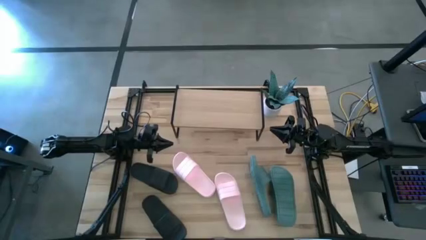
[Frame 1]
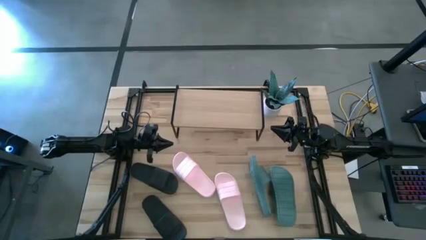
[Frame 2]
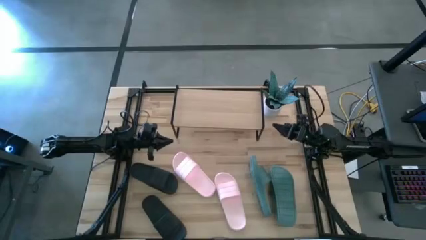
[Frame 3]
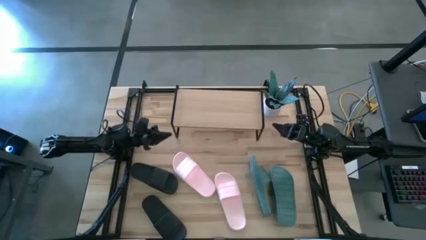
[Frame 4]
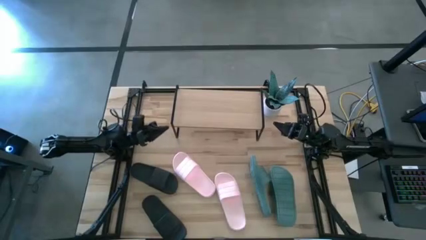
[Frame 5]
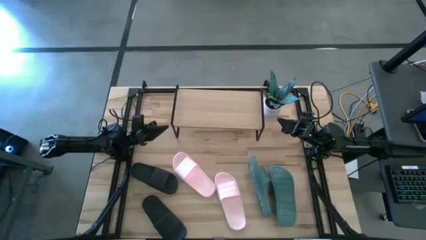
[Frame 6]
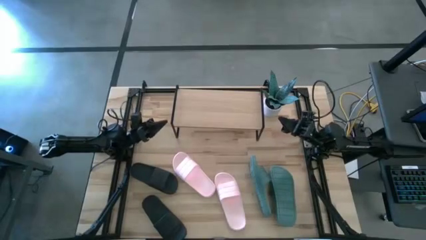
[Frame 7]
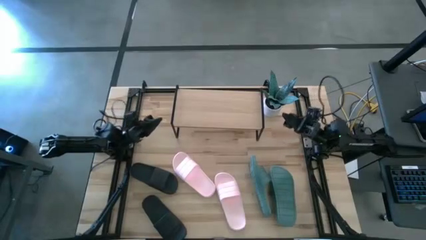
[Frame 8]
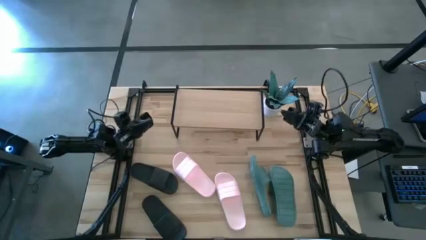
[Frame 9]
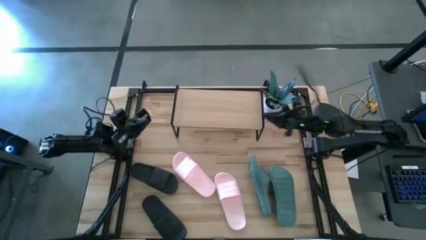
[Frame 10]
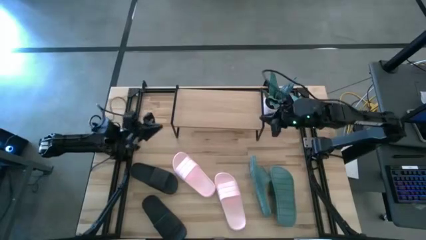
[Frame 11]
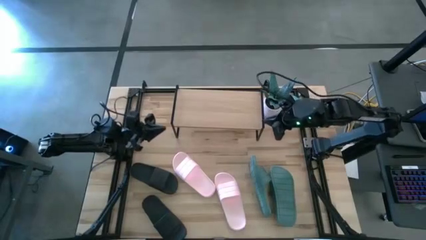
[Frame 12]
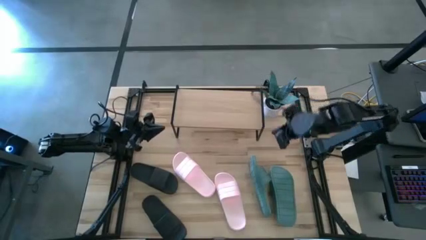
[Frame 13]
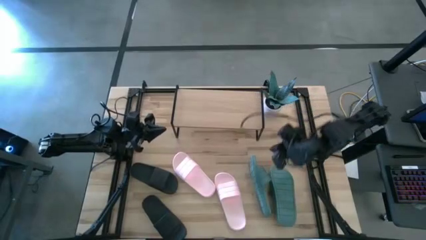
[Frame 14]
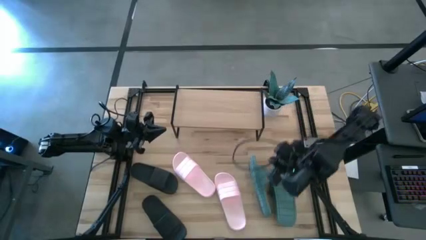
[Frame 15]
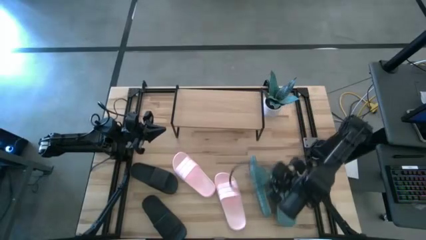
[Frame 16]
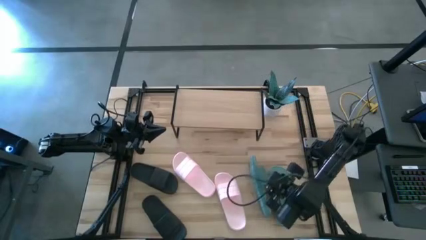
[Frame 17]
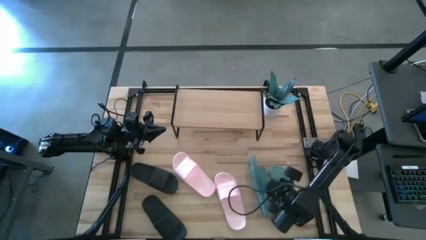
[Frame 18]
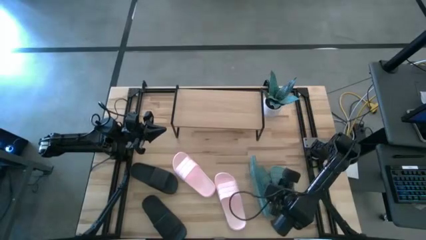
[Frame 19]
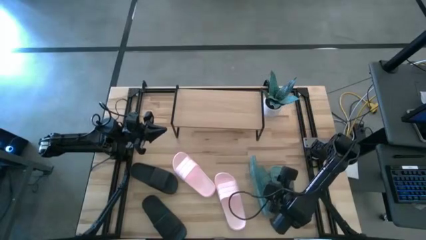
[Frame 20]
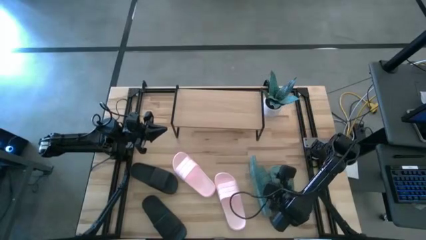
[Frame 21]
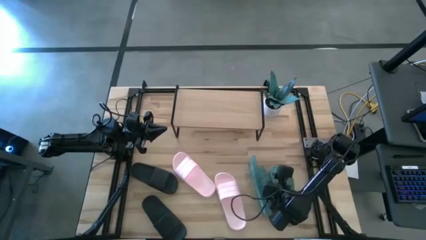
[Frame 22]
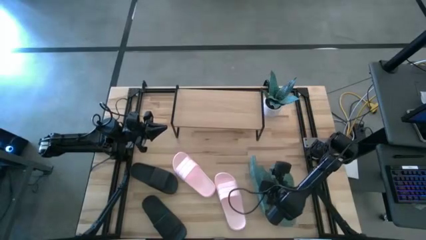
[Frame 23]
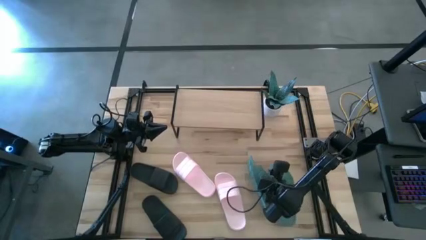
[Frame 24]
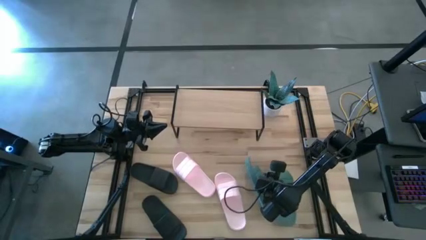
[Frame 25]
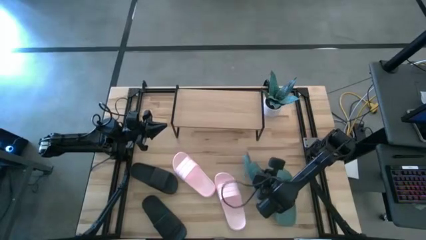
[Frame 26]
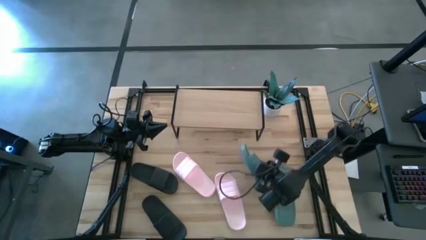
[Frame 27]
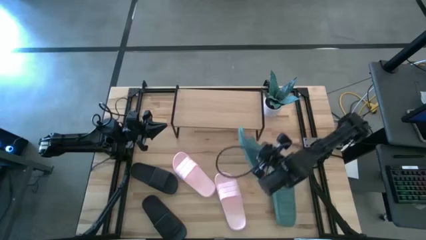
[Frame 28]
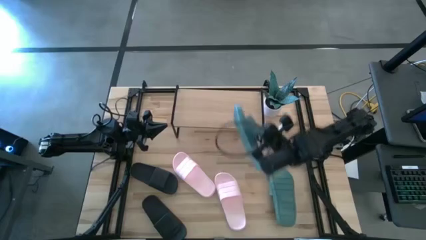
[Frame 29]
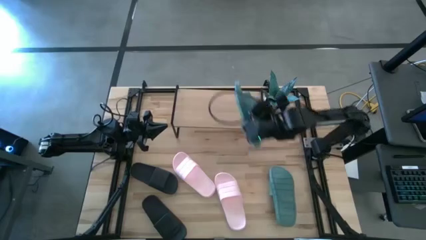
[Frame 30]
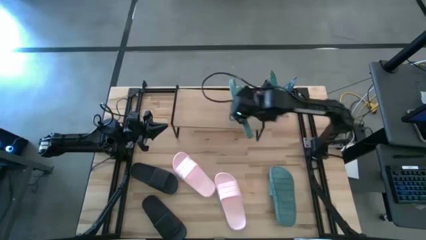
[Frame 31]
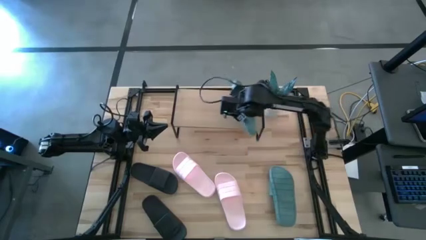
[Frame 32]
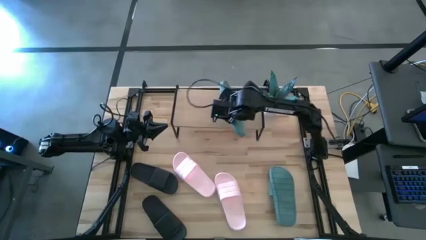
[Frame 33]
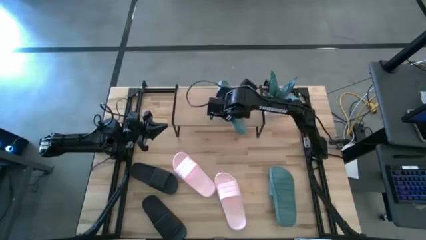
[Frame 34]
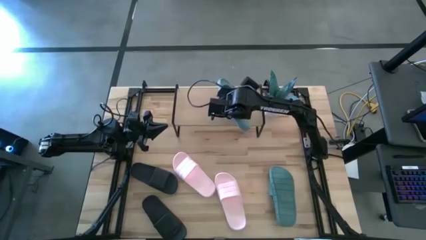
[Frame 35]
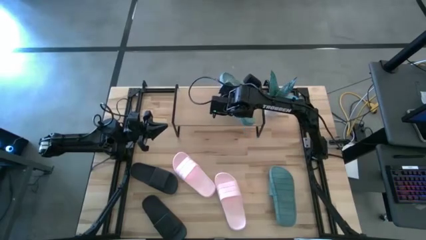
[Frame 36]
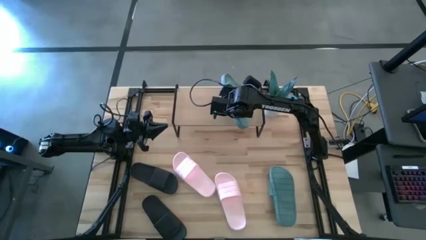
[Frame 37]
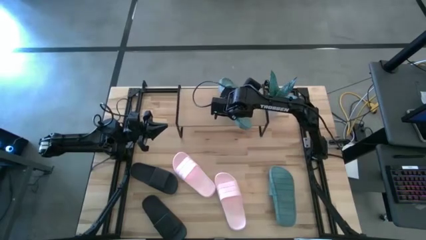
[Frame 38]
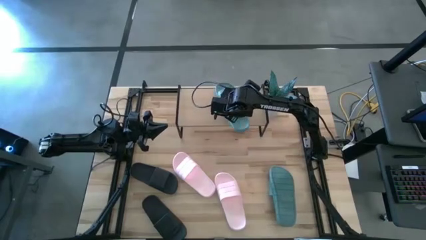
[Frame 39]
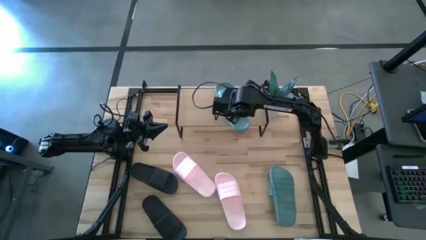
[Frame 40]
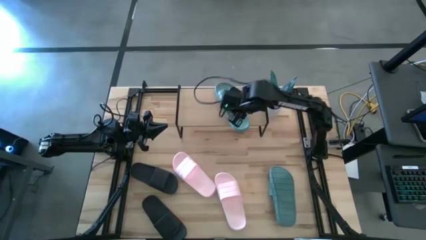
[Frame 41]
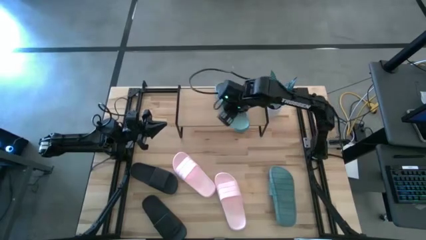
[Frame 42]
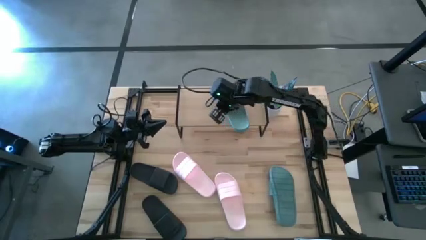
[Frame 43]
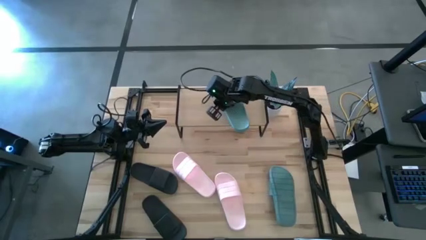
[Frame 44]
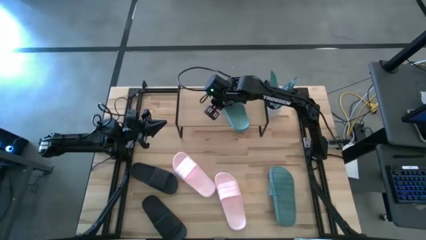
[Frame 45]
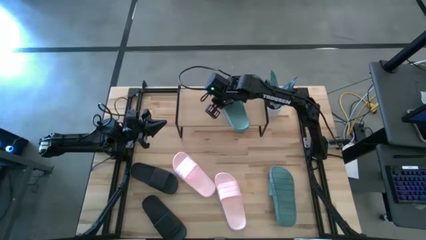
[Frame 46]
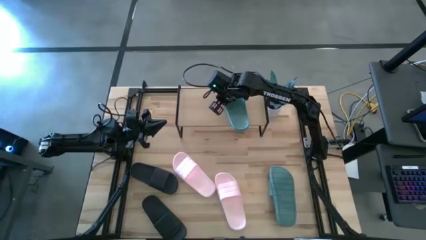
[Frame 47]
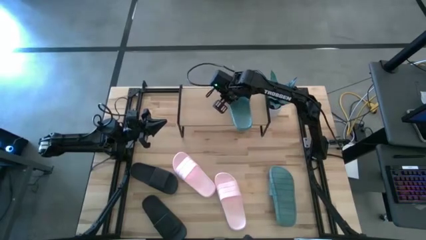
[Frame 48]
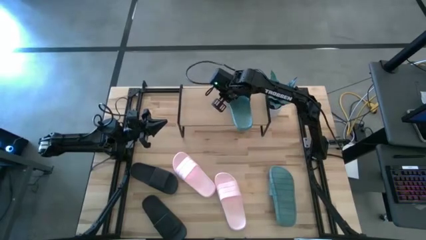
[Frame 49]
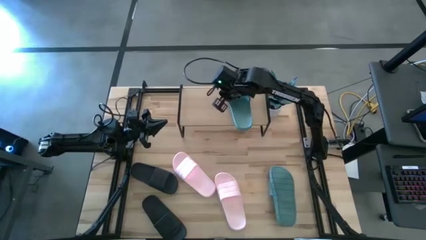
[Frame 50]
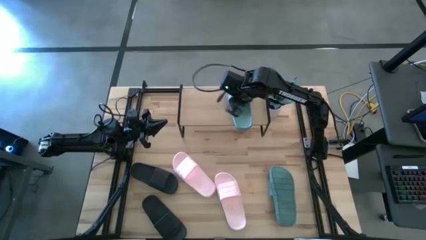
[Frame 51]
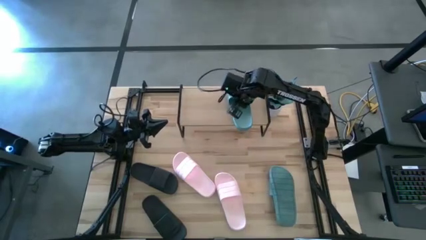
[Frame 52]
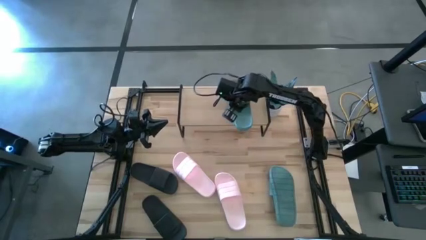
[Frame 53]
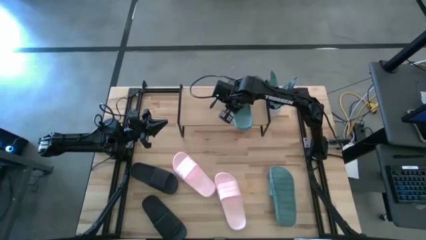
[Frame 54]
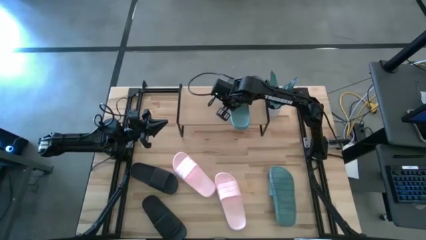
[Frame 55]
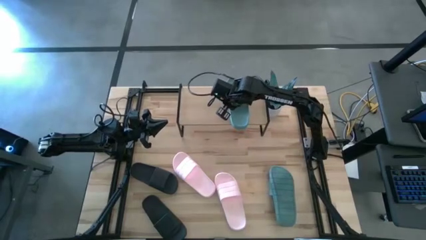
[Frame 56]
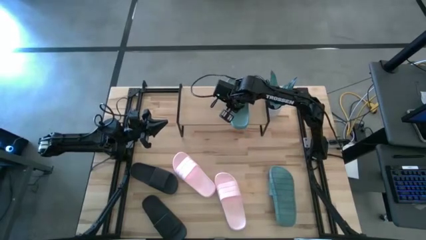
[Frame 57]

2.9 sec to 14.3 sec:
Task: Pick and place slides into the shelf
Put the left green slide on the shelf

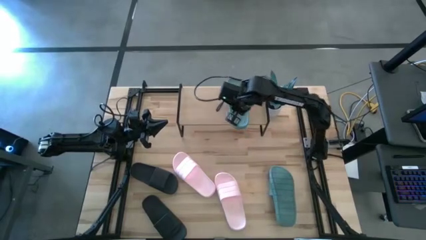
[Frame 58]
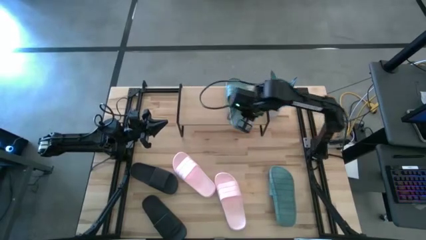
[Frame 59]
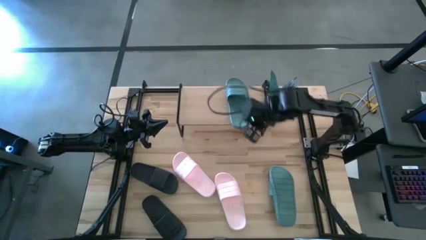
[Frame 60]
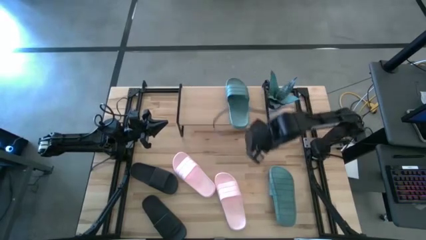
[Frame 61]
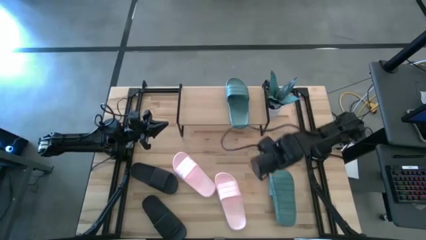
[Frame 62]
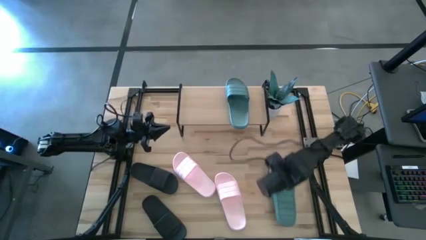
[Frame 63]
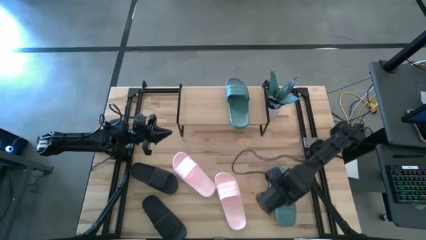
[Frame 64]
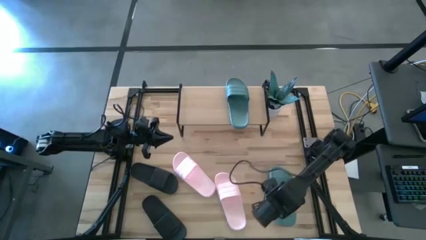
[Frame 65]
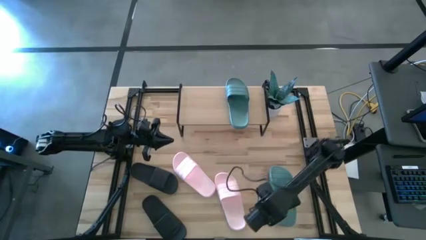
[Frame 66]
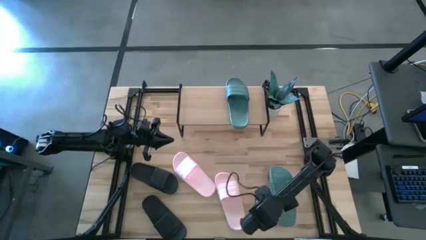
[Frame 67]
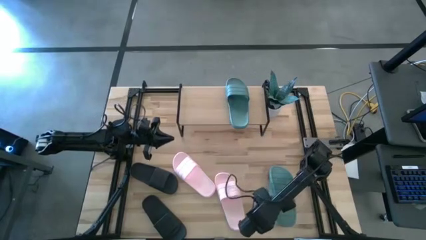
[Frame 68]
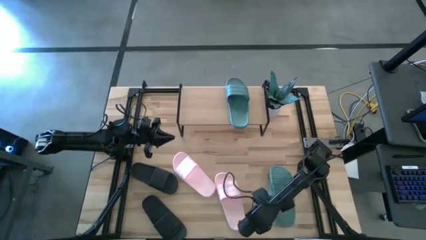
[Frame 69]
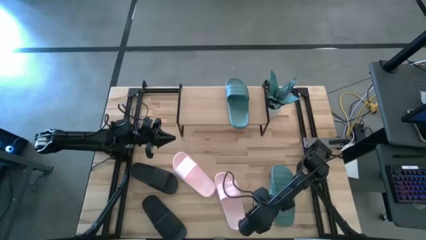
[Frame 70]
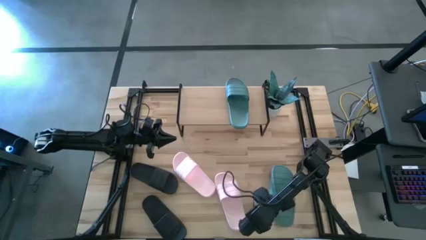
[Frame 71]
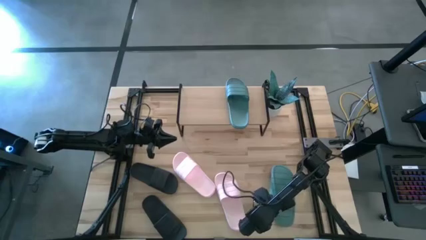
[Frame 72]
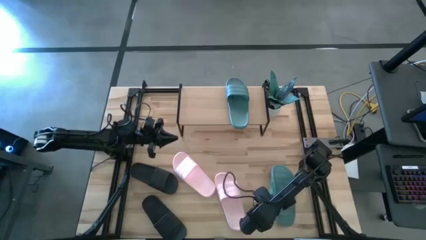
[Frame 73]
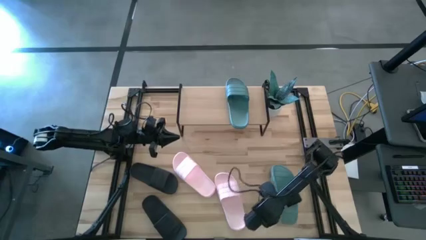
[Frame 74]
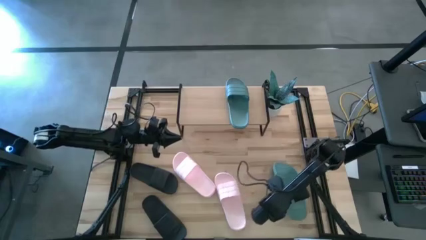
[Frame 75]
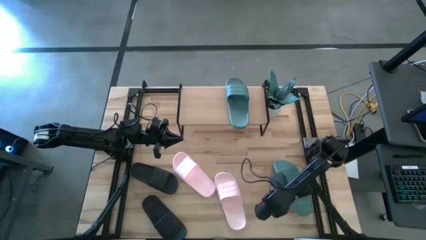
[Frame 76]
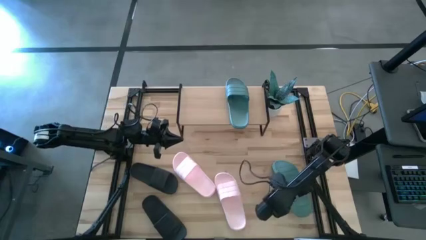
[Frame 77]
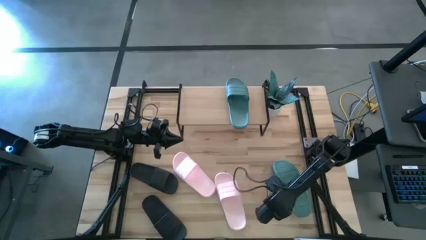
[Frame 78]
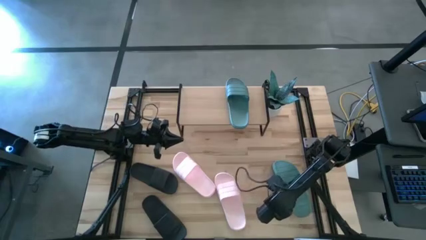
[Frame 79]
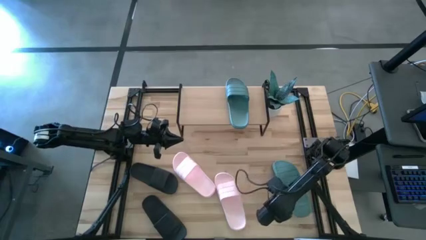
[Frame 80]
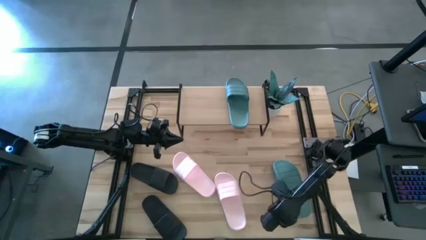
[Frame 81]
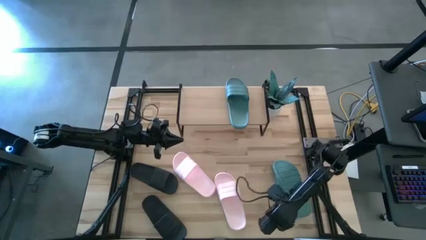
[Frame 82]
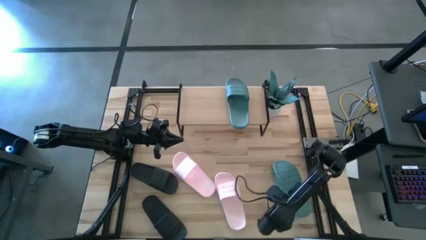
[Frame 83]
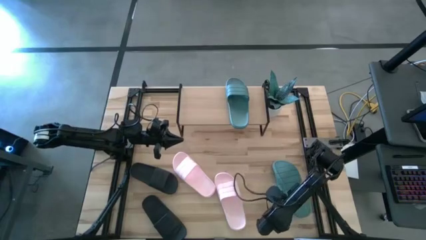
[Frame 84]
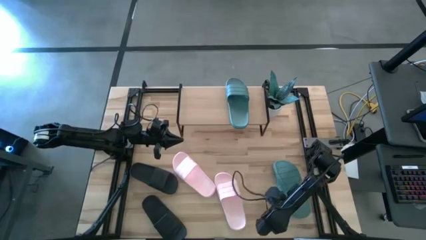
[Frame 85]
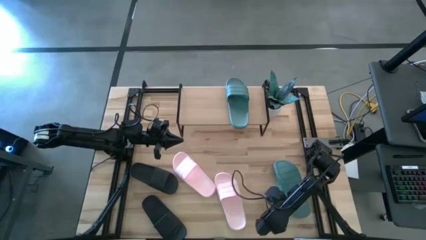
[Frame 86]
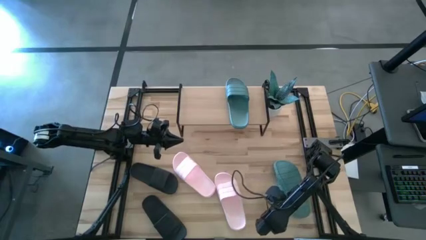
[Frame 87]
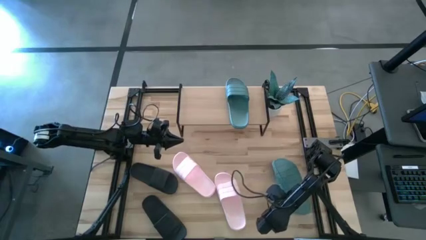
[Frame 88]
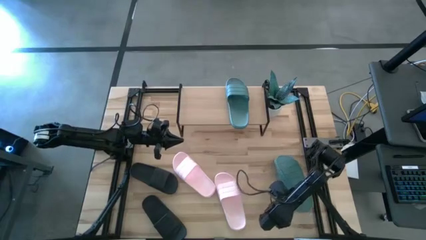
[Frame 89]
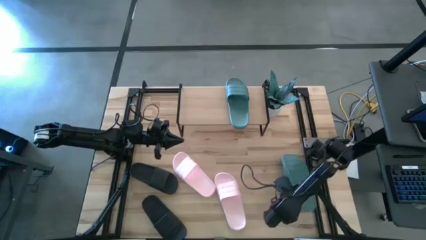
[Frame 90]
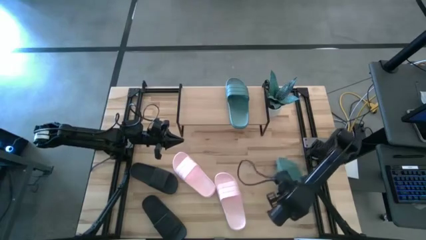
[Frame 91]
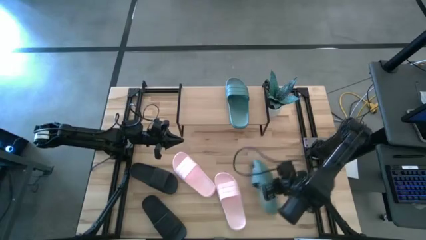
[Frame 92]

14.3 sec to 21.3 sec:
Put the green slide on the shelf
